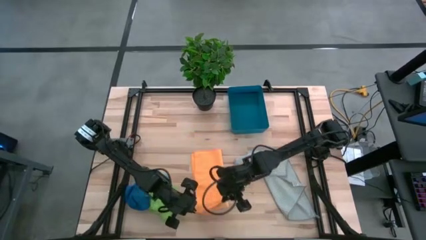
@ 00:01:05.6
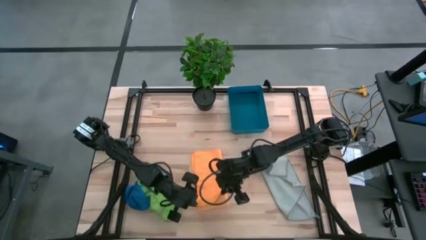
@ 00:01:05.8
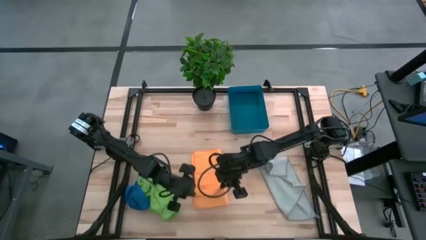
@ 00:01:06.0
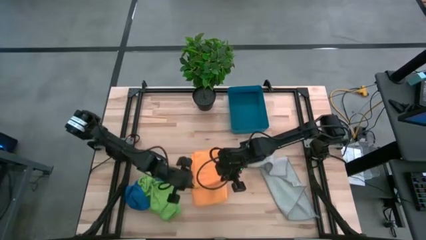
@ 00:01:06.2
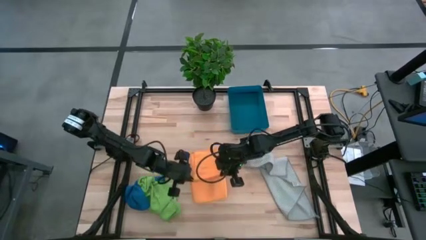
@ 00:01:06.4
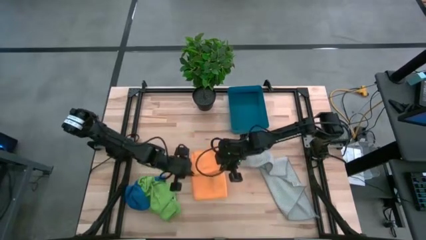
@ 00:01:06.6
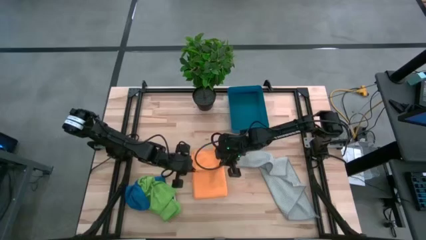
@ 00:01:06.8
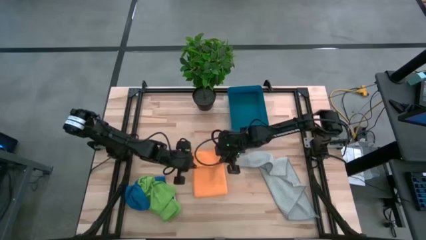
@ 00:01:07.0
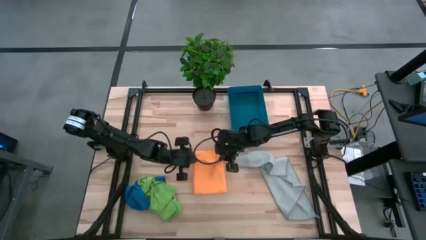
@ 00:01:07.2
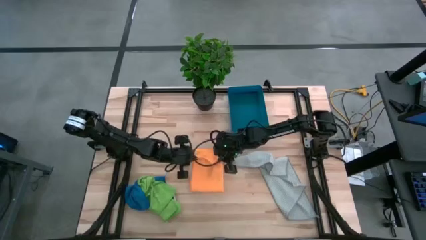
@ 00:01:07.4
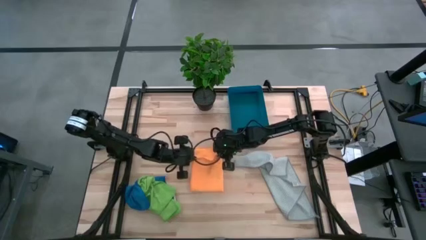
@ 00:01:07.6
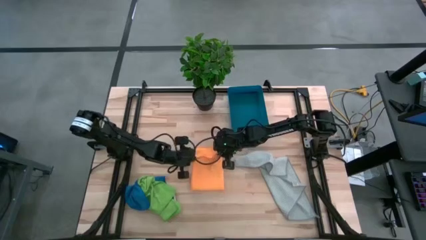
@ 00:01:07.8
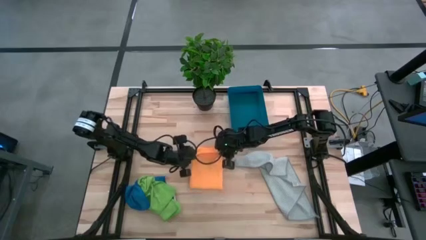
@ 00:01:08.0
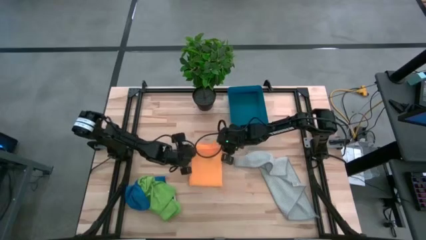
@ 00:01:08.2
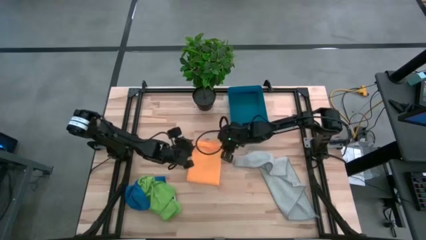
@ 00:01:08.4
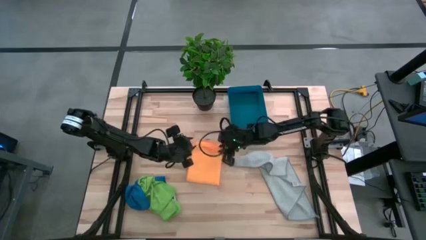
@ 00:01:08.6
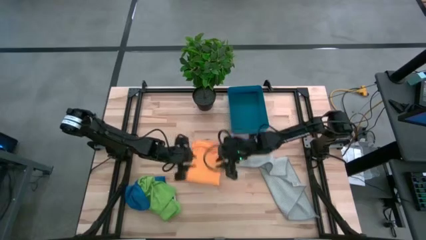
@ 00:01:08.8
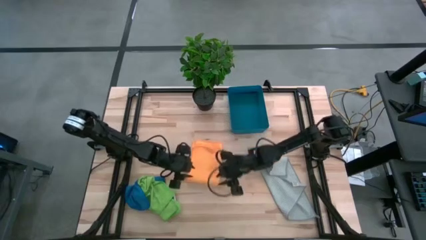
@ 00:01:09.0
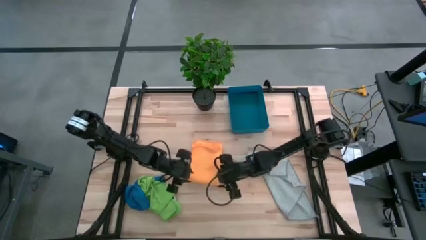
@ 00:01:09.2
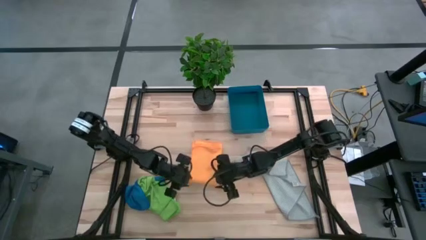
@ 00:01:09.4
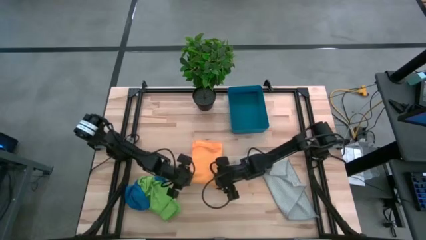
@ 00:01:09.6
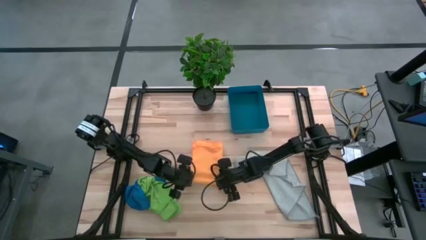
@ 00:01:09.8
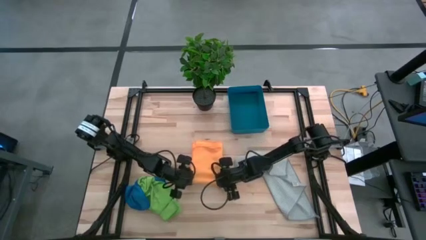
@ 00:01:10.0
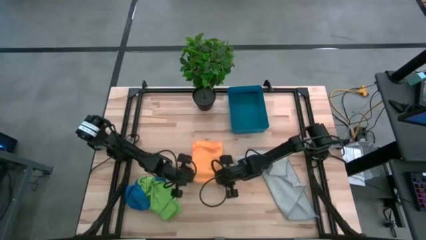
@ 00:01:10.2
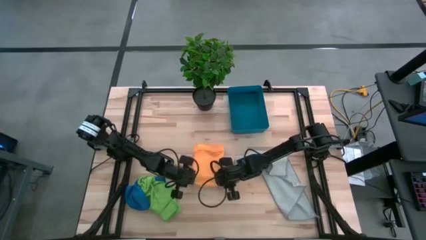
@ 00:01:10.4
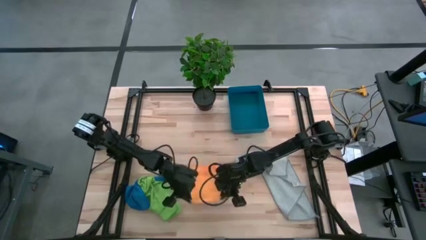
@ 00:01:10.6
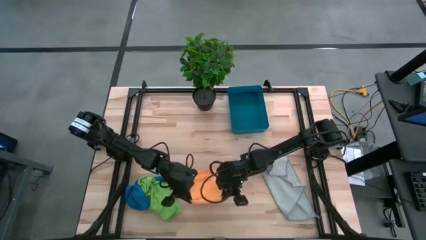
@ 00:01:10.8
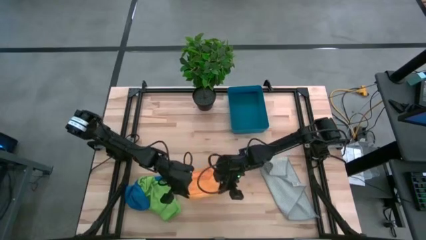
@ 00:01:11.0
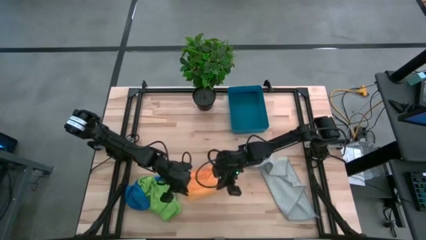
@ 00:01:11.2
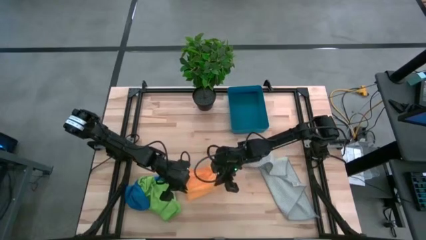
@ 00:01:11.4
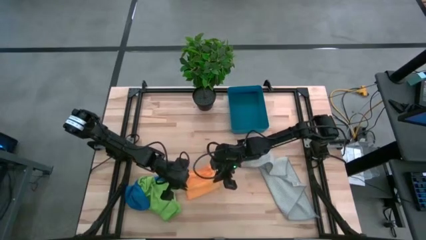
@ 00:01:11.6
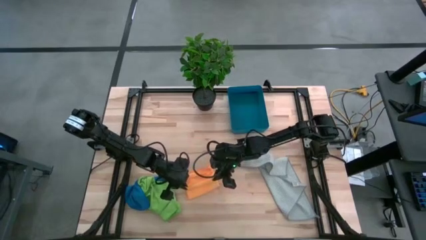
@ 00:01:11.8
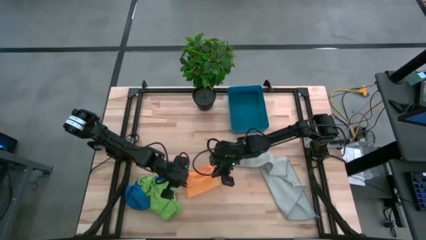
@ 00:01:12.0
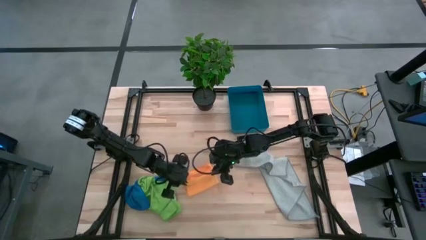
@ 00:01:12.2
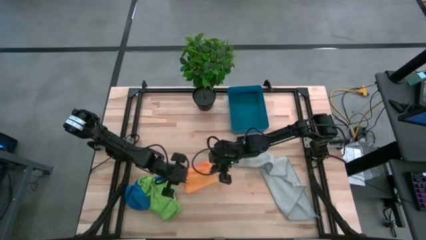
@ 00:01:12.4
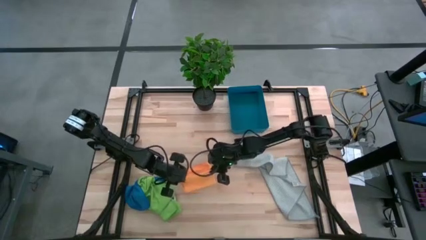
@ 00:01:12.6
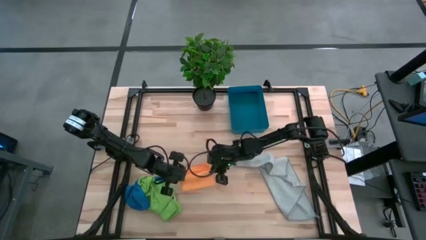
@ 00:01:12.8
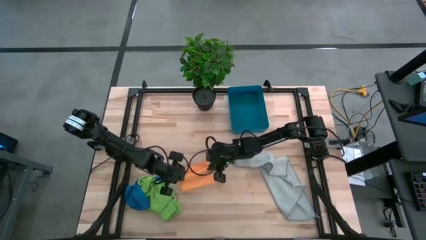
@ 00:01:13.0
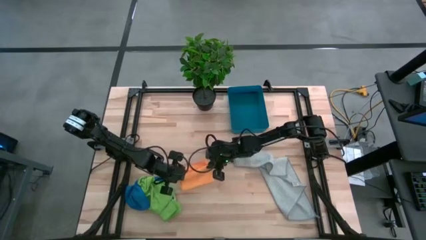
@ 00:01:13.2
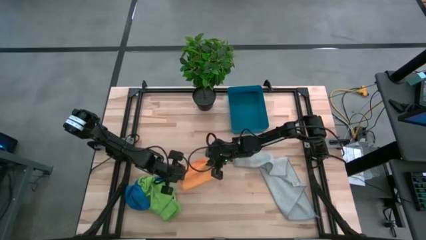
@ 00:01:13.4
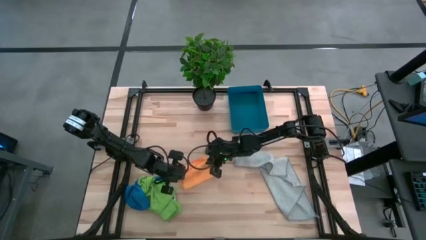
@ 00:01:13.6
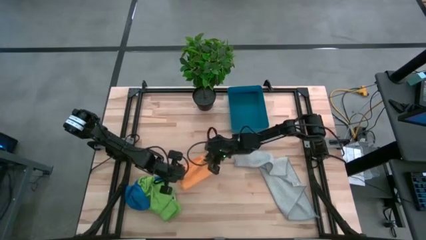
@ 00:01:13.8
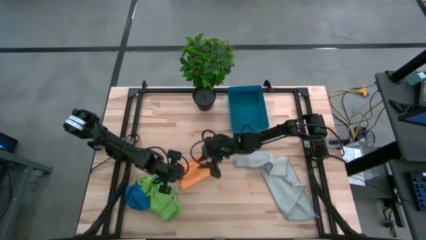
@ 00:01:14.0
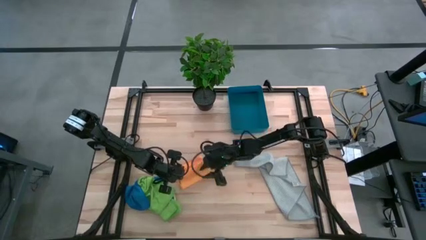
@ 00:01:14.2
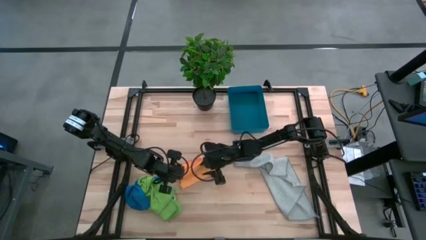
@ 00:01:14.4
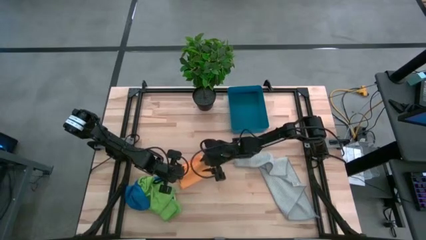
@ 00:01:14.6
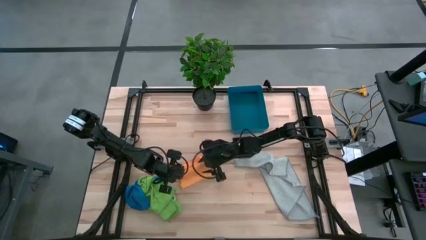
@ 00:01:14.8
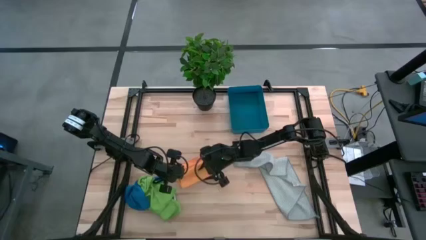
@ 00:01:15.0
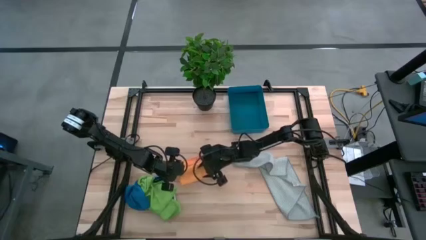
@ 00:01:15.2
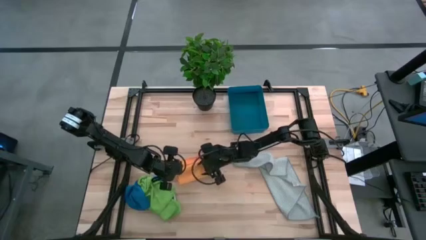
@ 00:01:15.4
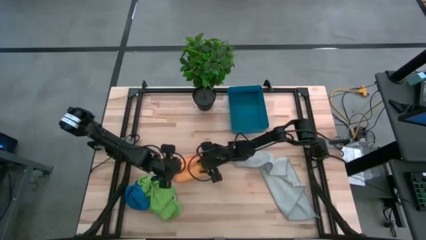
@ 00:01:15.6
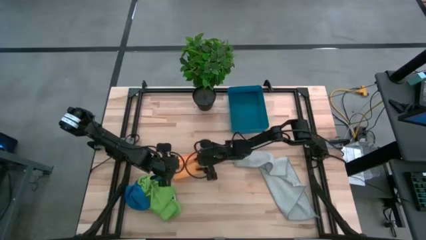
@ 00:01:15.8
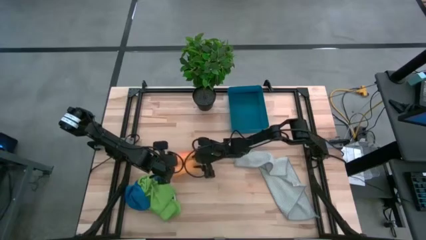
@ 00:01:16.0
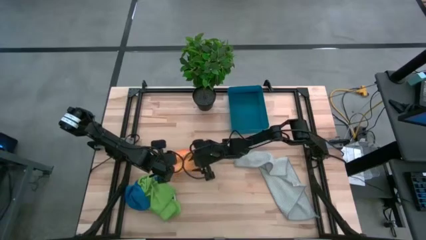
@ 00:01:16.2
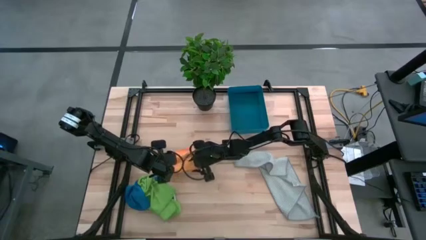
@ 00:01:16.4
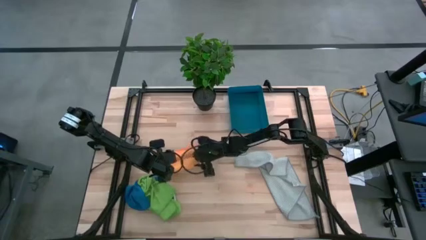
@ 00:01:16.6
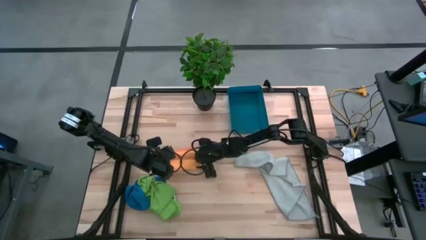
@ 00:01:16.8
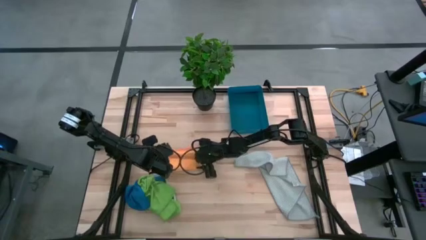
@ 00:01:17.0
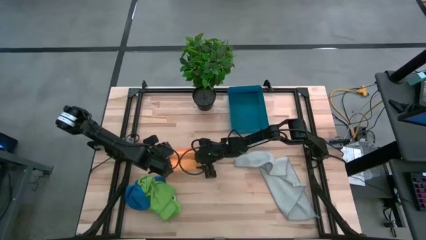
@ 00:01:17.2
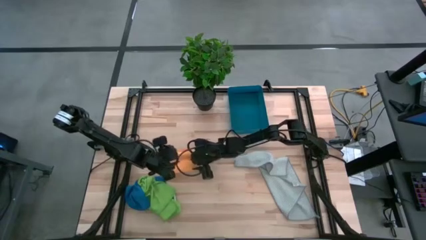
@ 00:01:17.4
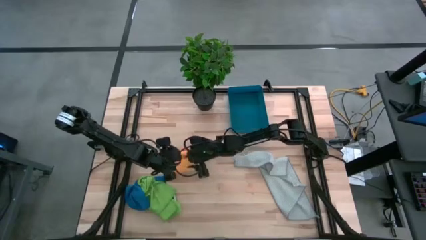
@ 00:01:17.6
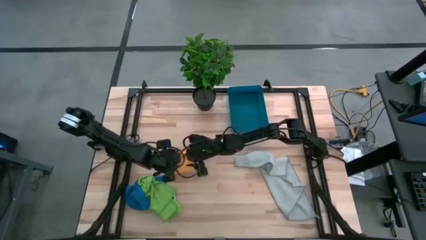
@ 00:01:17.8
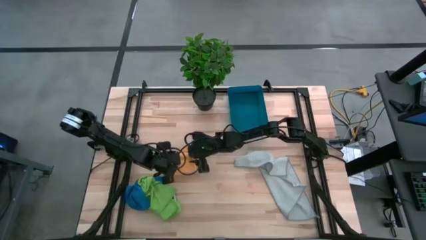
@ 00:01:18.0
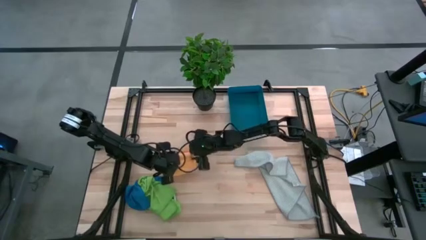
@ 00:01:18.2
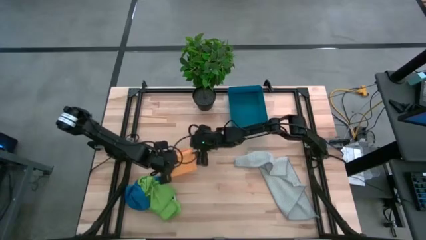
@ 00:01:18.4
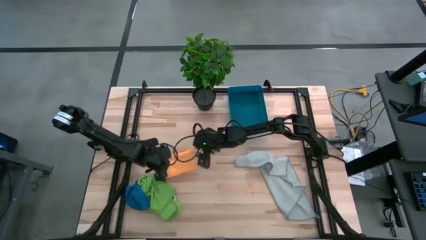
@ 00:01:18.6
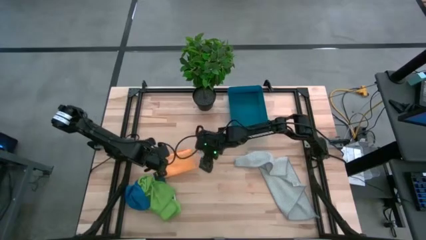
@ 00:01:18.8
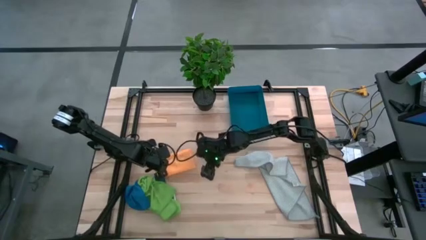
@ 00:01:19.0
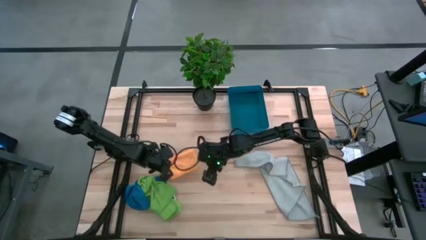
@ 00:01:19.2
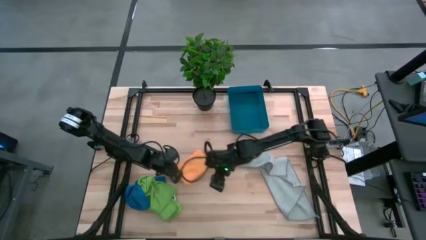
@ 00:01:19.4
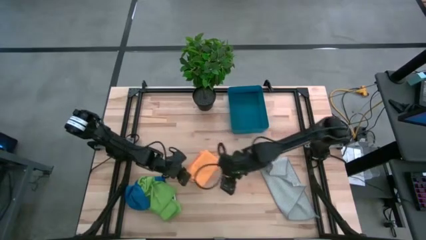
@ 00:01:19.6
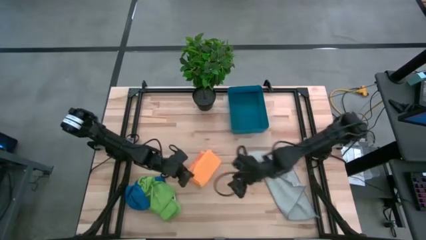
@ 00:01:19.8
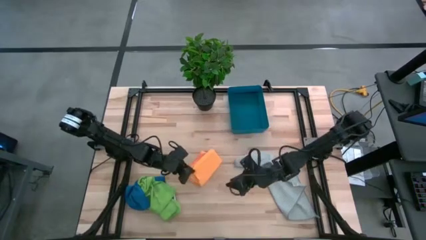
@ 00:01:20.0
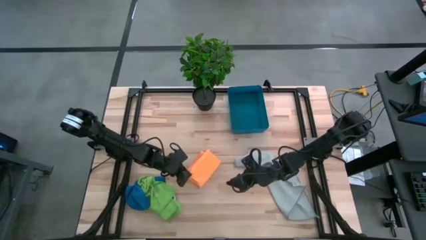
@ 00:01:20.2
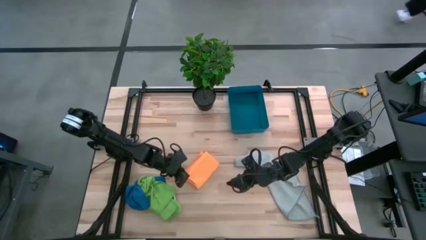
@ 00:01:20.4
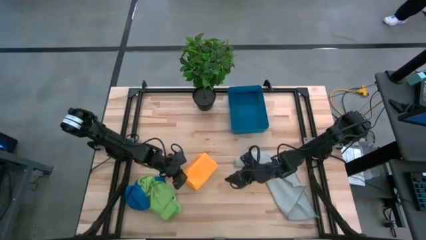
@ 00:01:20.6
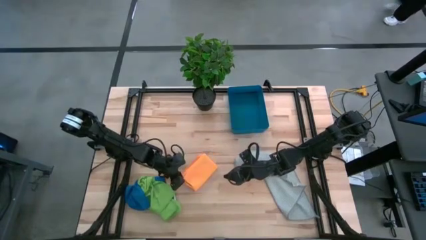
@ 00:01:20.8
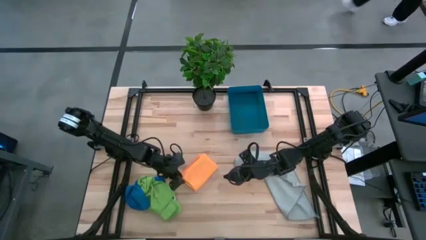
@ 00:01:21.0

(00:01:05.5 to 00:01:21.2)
Task: Fold microfiber towels
Fold the orange microfiber towel

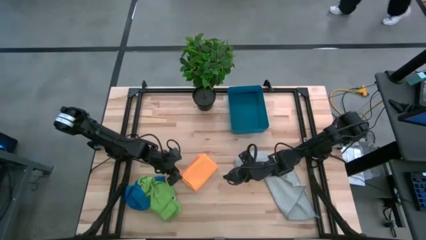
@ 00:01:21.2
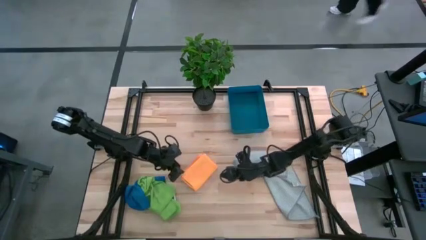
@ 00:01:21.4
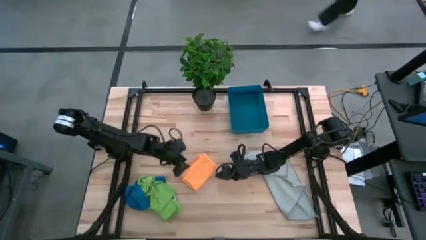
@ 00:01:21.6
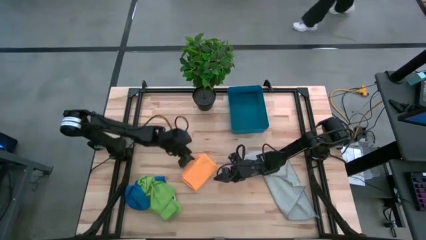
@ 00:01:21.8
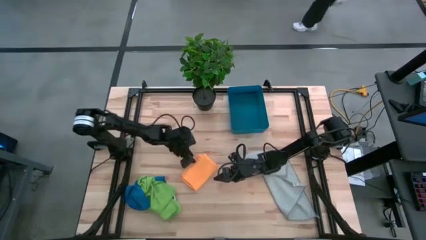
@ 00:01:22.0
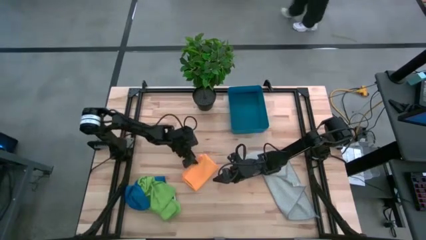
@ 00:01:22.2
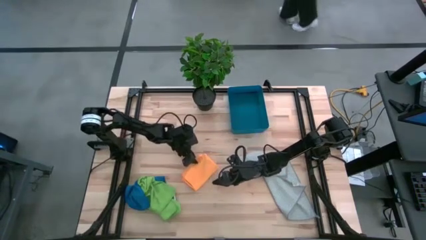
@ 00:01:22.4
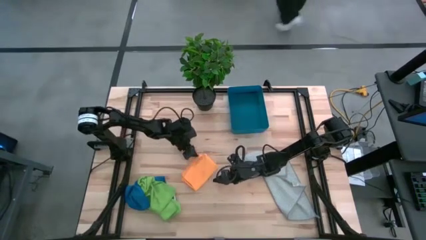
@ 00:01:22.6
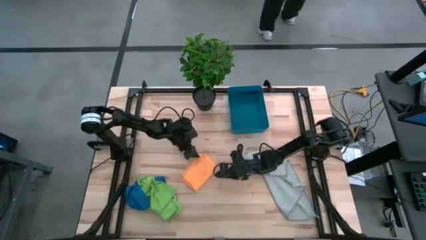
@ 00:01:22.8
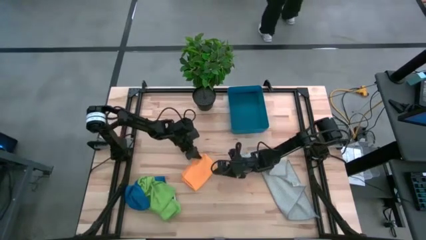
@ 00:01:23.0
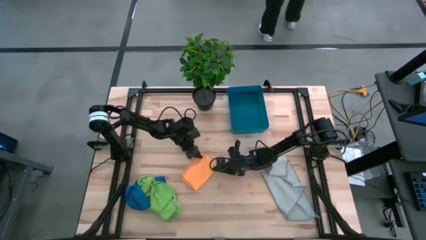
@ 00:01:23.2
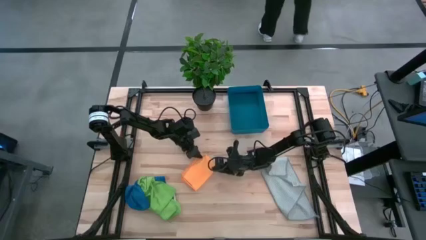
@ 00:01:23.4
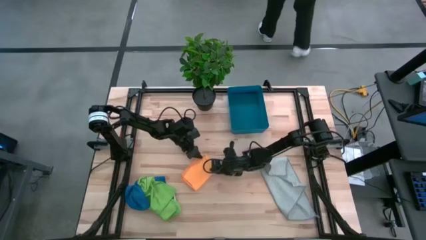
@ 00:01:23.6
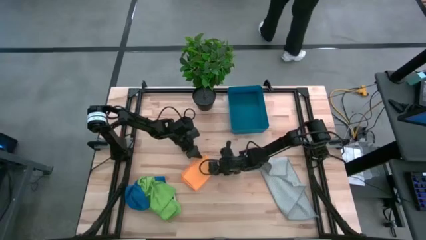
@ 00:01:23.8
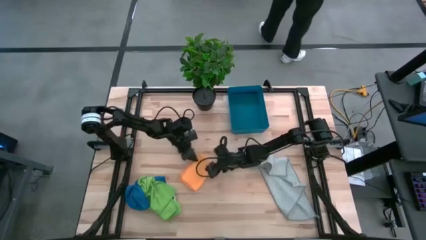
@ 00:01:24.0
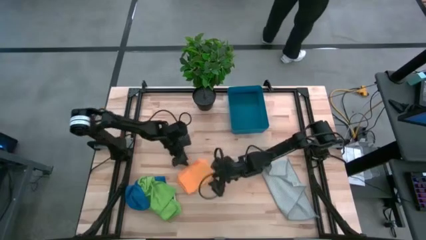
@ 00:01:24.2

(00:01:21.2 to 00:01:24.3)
Put the orange microfiber towel into the blue bin
